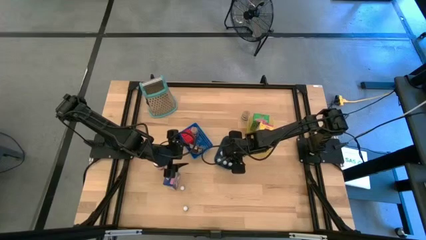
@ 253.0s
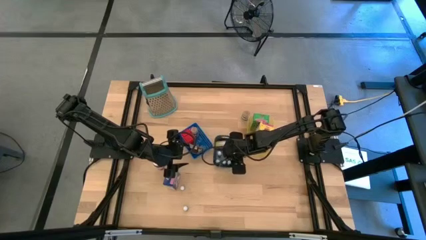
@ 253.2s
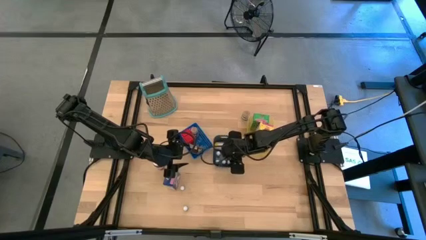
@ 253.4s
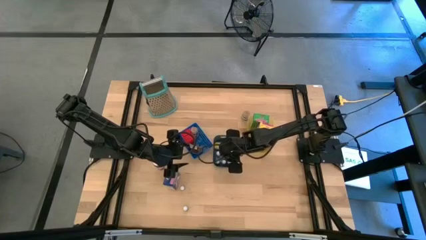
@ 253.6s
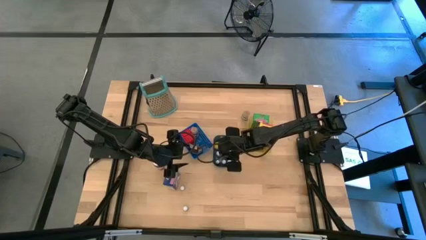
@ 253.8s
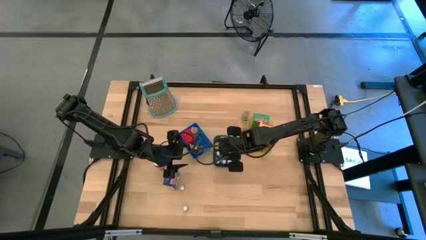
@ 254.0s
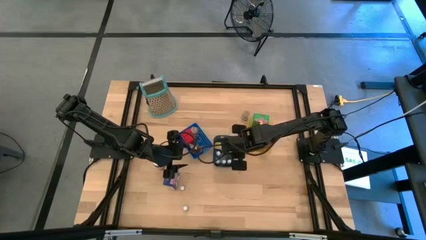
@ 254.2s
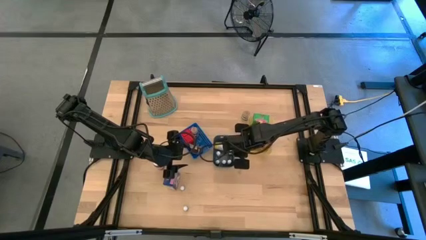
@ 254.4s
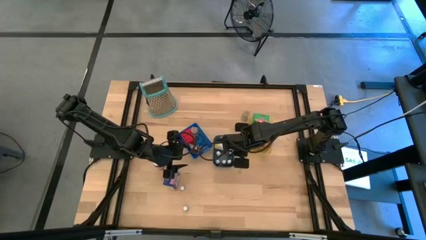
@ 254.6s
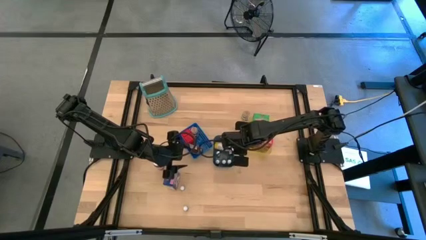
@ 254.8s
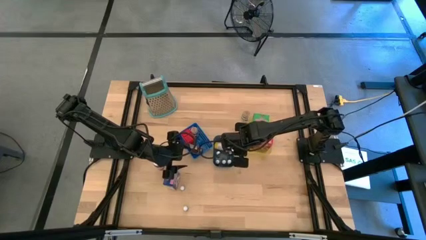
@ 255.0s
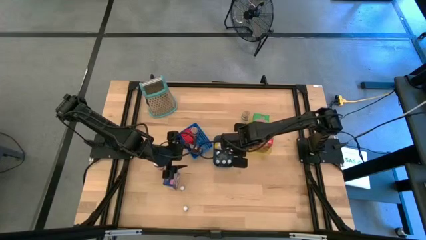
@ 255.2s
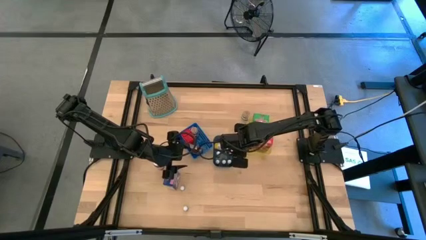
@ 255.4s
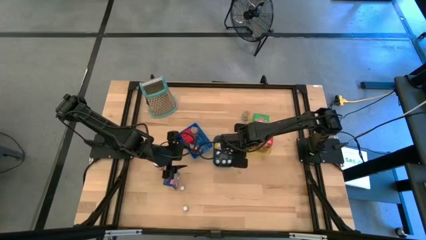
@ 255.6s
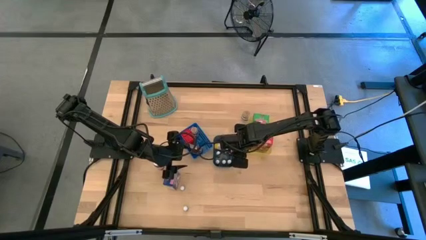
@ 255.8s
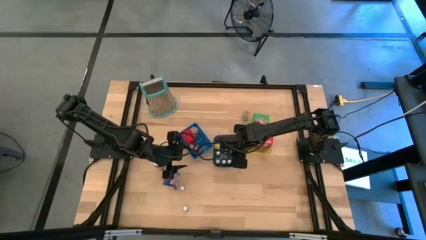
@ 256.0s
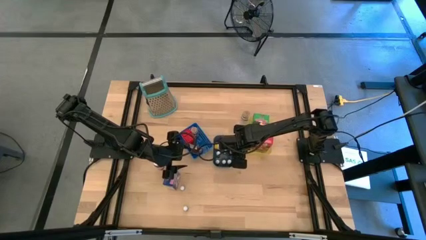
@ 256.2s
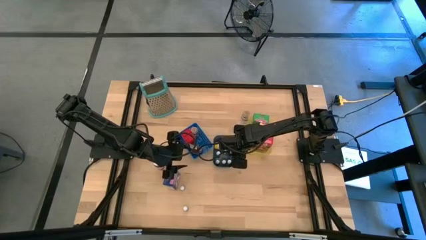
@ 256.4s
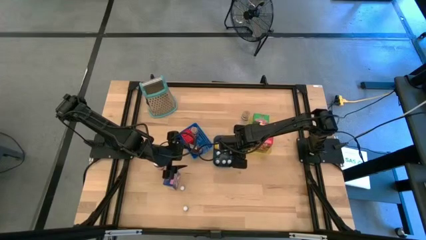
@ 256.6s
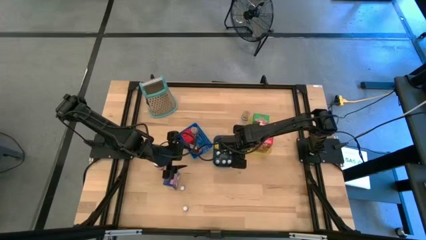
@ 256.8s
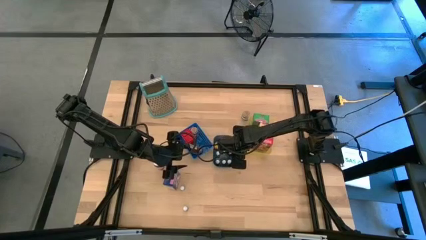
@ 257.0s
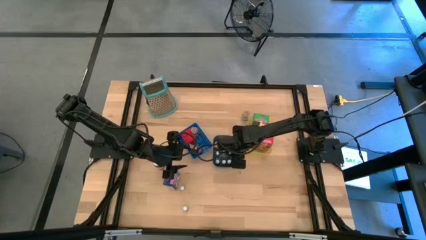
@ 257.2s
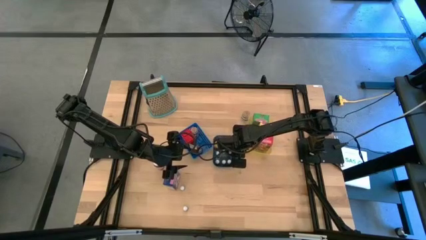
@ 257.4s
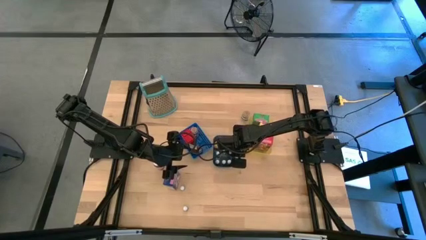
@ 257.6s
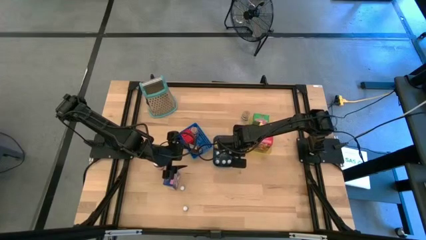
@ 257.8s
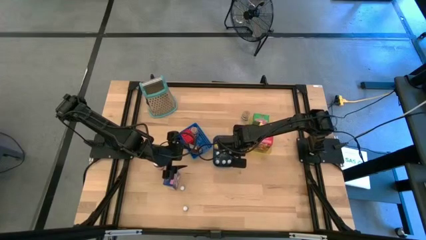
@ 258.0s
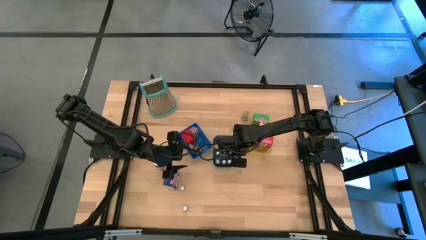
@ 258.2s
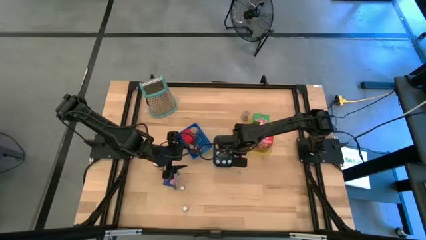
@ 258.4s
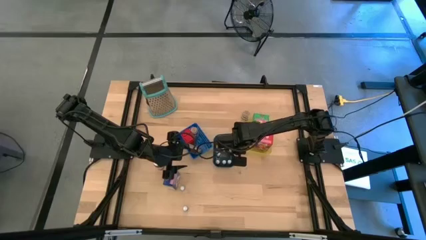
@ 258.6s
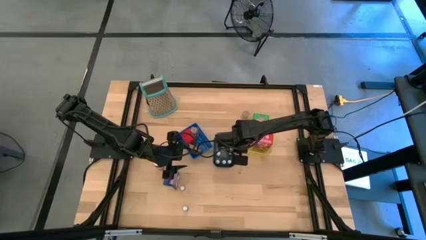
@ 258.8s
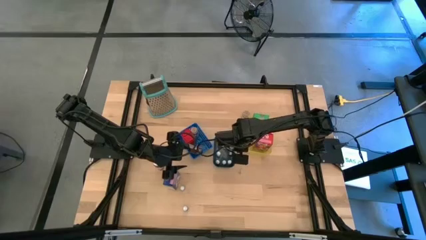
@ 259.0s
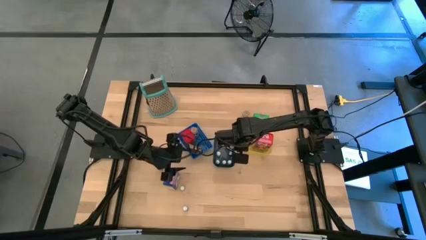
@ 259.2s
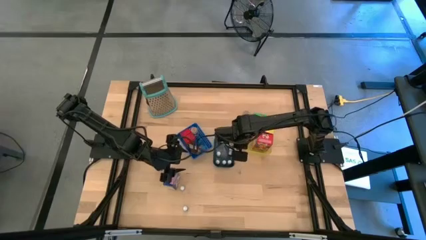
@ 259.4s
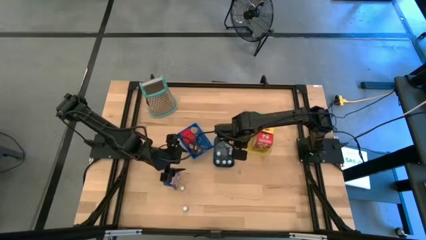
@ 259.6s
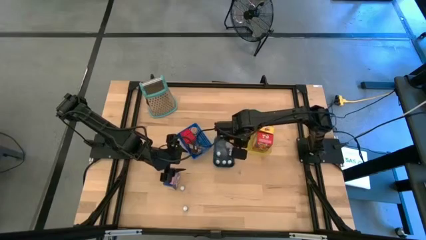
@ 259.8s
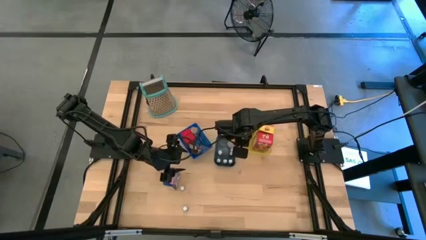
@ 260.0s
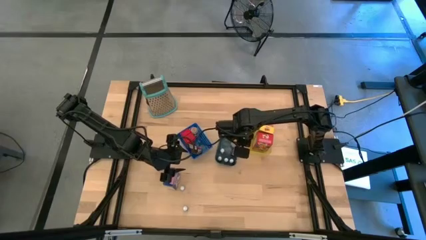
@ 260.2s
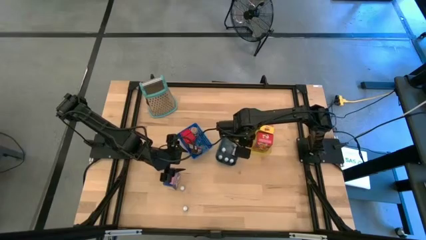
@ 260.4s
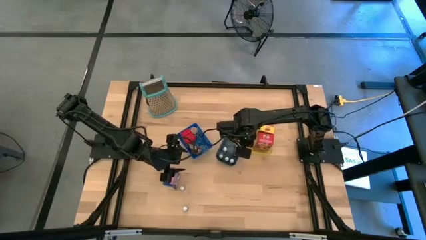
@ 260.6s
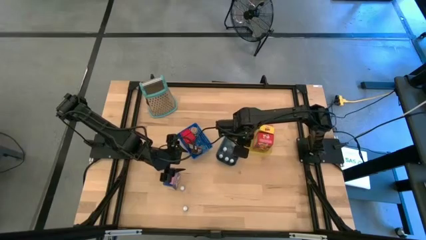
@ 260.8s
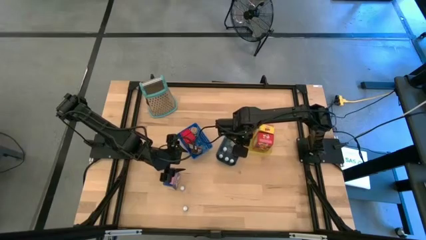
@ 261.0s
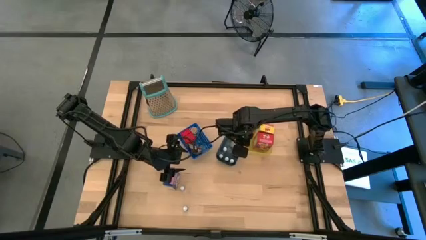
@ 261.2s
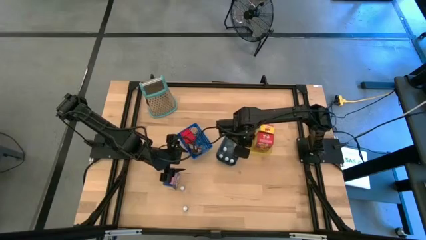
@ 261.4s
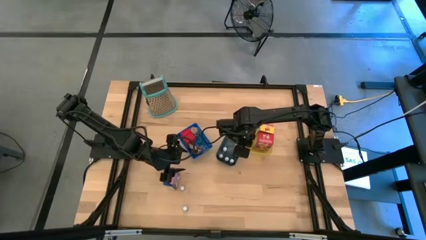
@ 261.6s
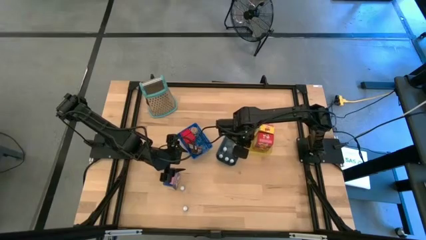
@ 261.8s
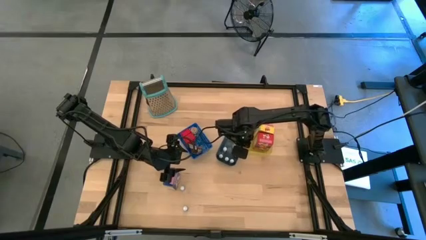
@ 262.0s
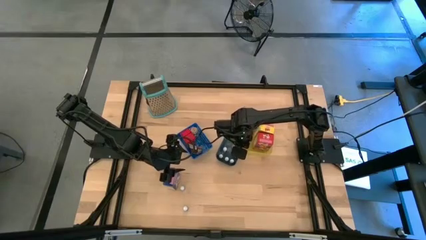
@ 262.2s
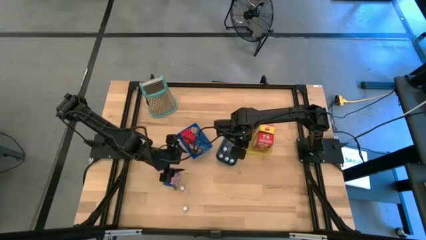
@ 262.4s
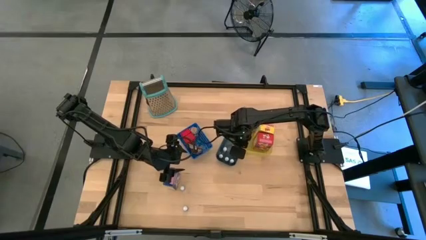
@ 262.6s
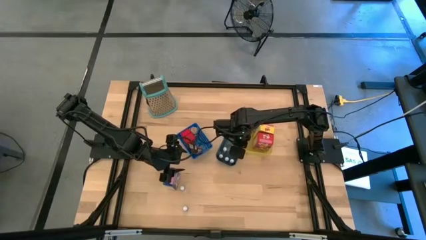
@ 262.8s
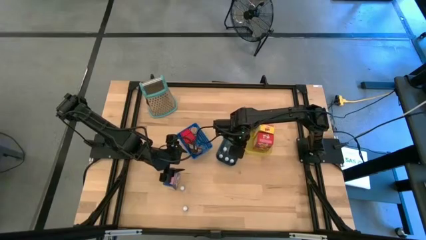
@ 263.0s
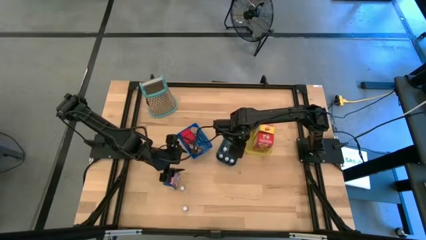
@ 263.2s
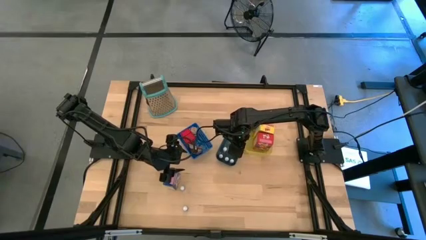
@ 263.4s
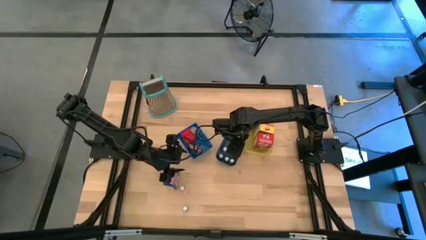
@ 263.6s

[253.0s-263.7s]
Task: Pick & Place Kitchen Items
Adjust the yellow food coloring bottle in the green bin

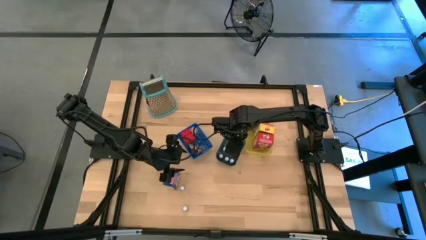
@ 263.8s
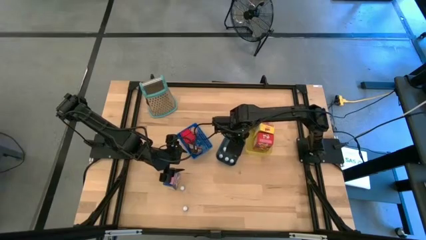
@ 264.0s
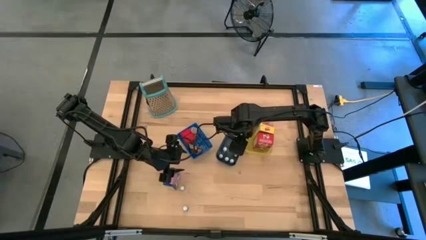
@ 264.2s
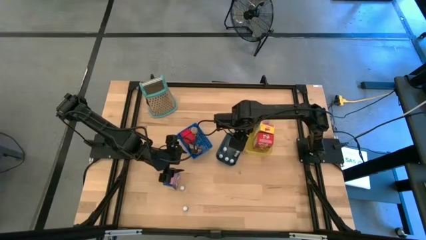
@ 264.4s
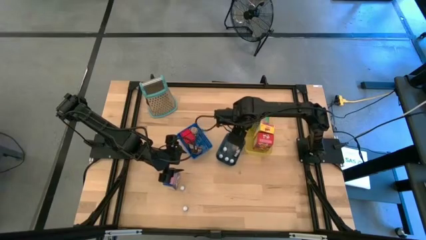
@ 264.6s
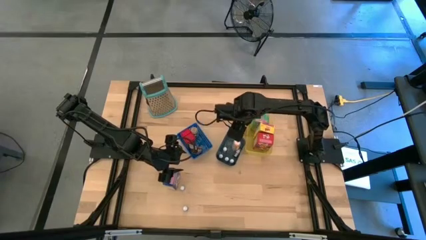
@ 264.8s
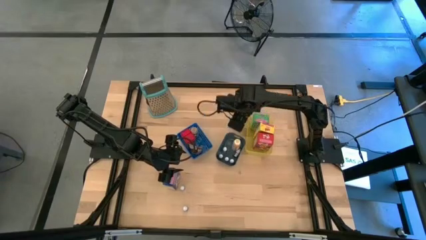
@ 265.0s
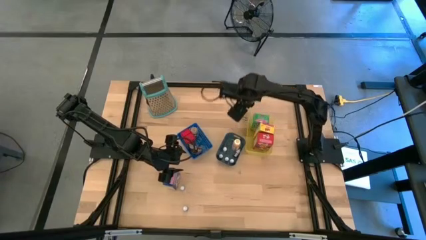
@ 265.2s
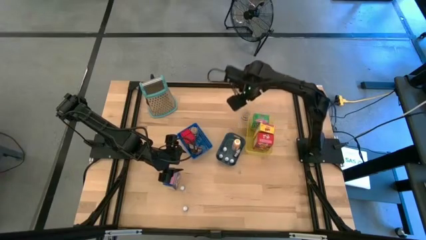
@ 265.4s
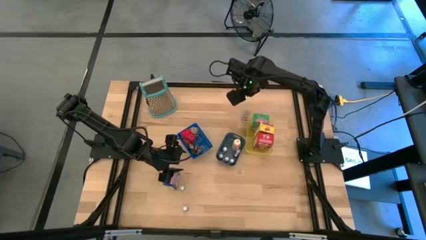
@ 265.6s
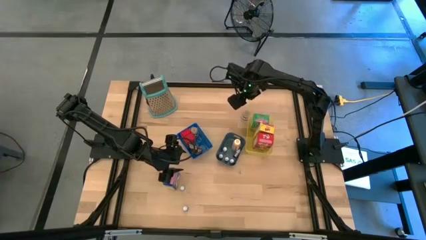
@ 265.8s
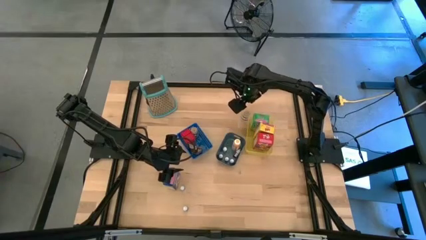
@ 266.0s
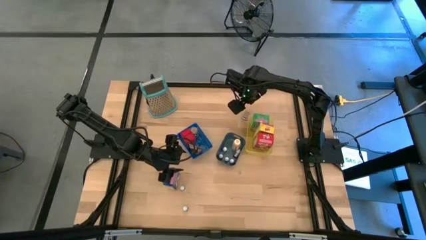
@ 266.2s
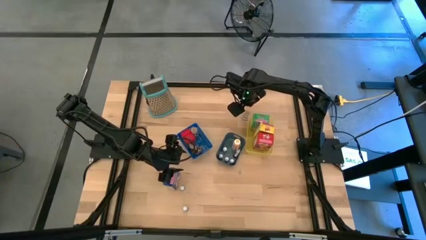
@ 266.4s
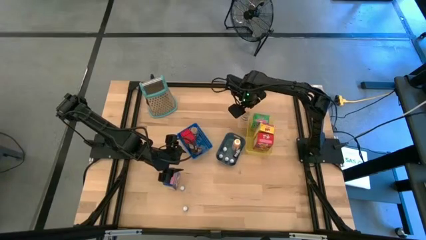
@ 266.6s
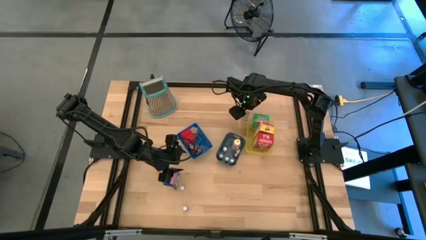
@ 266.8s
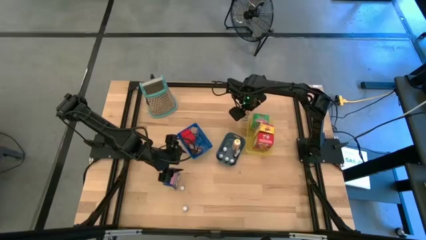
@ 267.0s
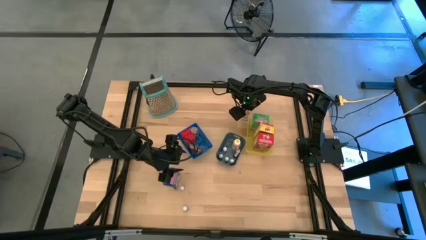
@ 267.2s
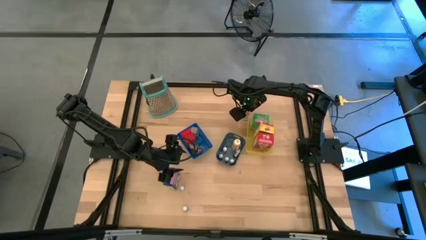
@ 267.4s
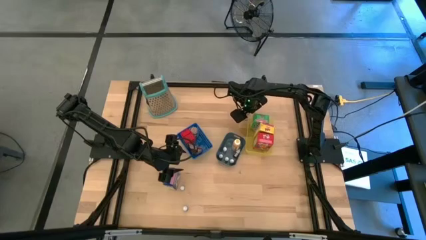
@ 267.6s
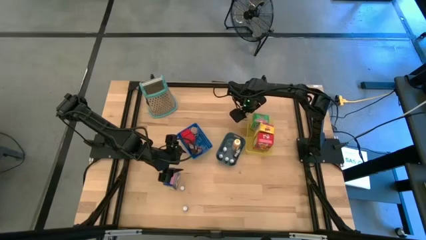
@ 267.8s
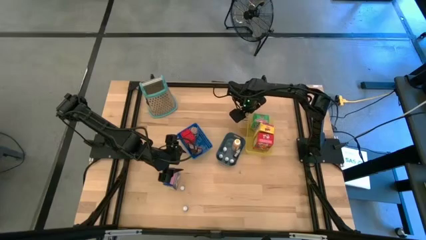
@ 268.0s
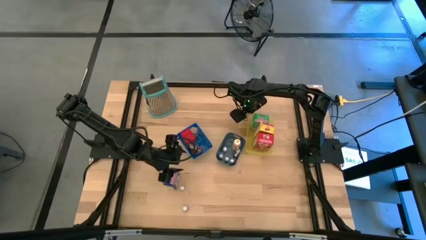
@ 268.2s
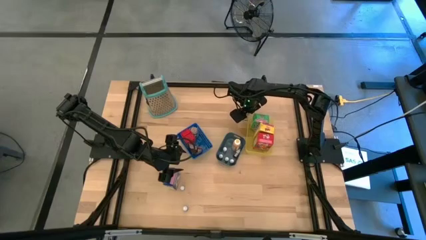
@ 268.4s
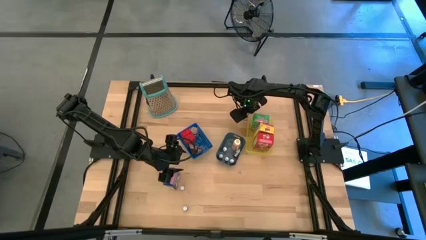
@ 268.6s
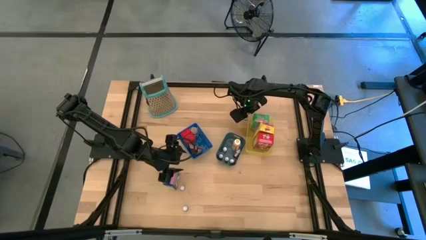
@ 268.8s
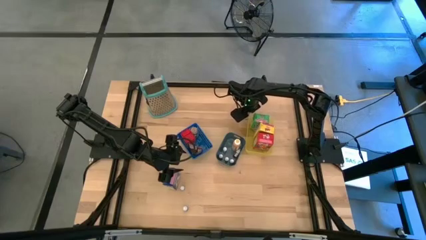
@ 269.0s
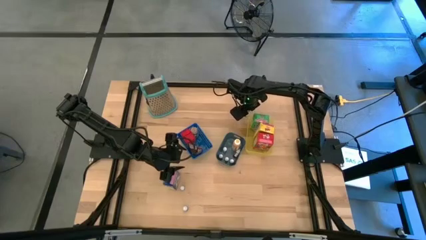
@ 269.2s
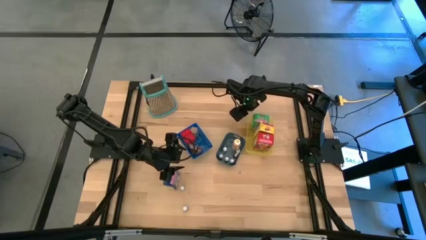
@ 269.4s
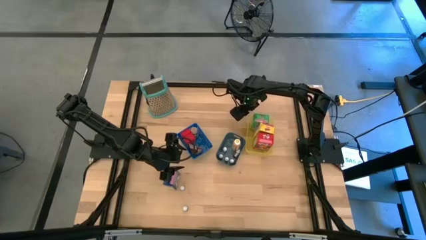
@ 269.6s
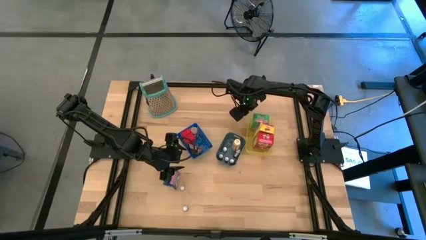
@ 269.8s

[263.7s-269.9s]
Put the brown seasoning bottle into the blue bin
